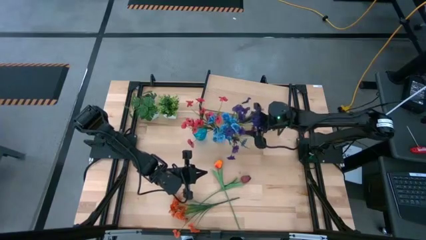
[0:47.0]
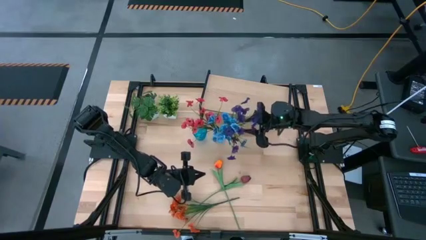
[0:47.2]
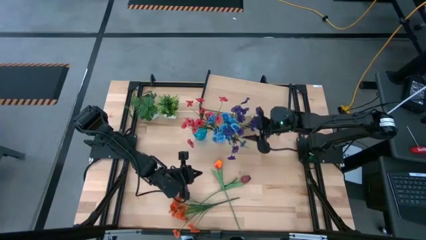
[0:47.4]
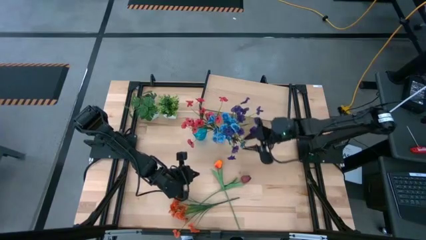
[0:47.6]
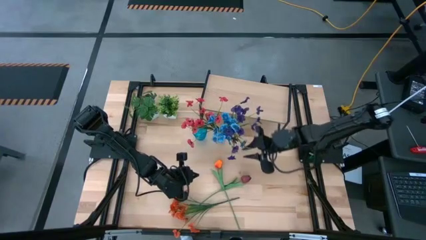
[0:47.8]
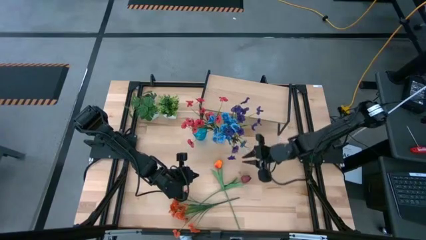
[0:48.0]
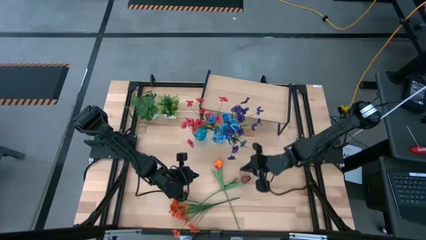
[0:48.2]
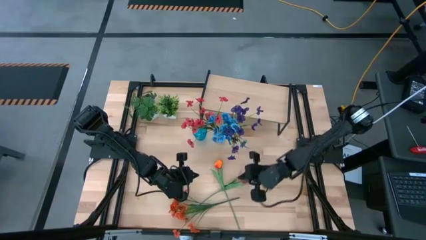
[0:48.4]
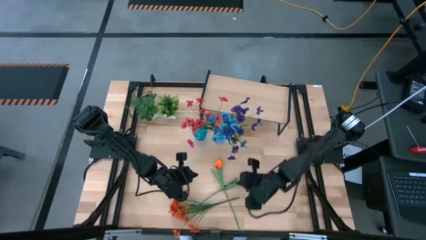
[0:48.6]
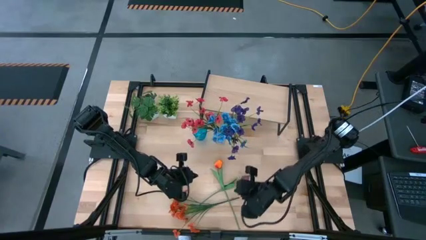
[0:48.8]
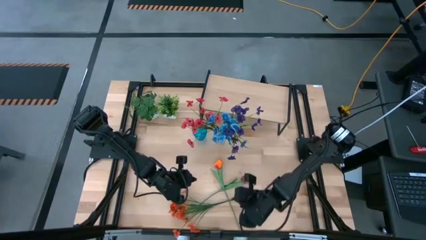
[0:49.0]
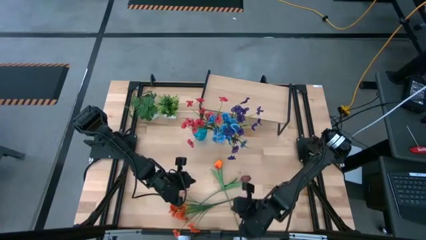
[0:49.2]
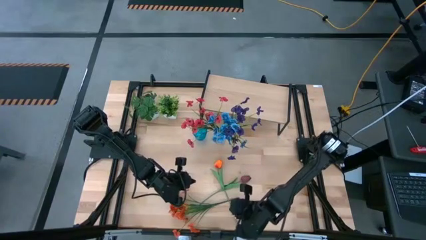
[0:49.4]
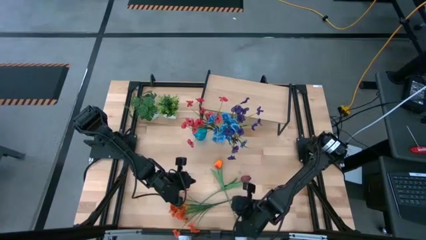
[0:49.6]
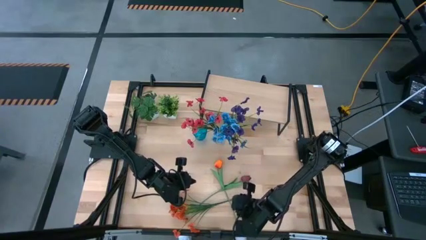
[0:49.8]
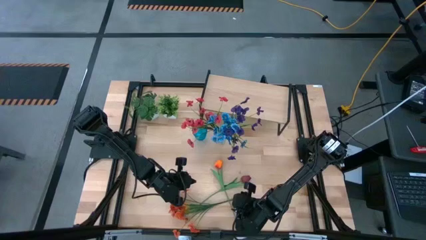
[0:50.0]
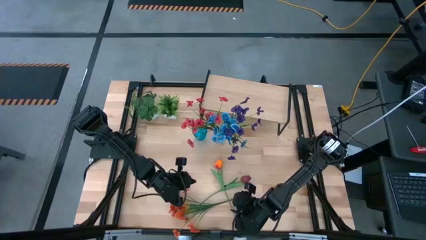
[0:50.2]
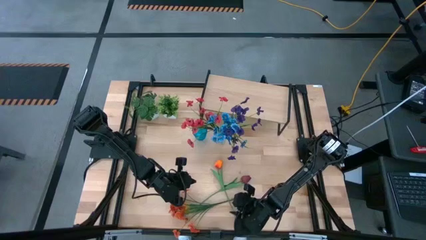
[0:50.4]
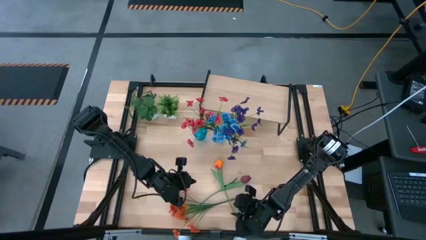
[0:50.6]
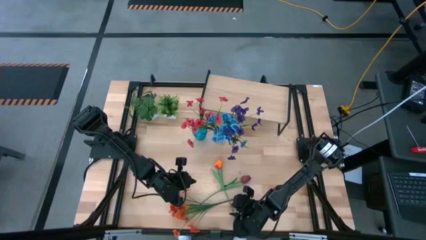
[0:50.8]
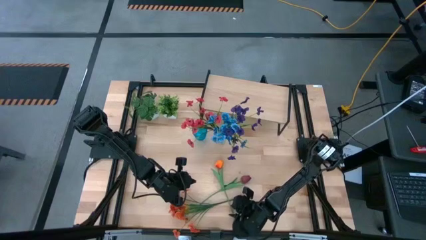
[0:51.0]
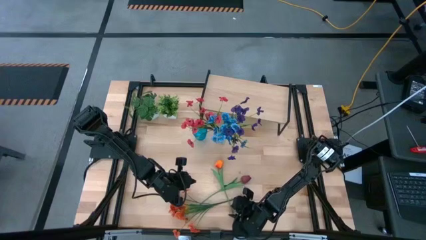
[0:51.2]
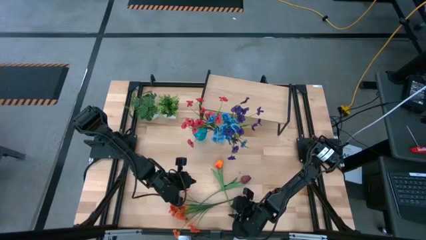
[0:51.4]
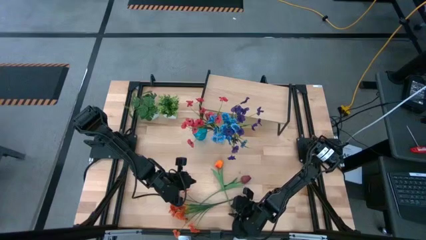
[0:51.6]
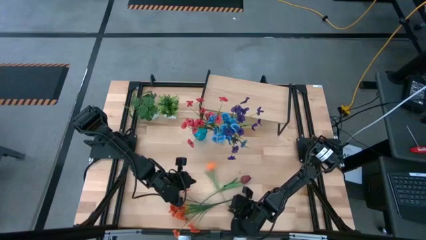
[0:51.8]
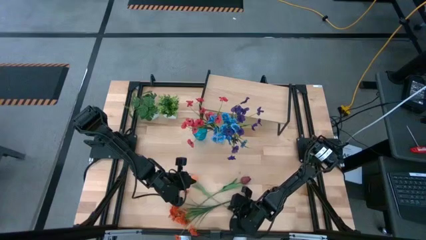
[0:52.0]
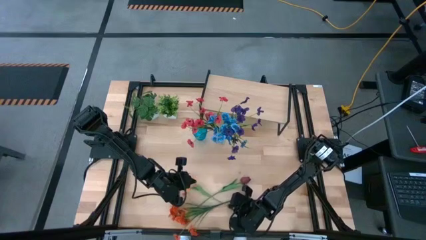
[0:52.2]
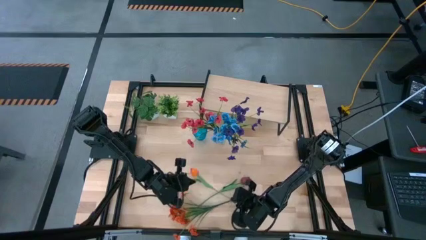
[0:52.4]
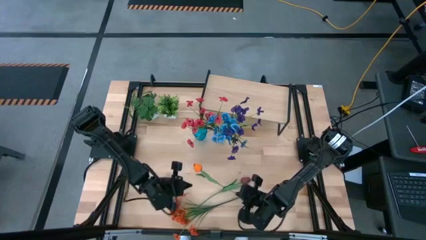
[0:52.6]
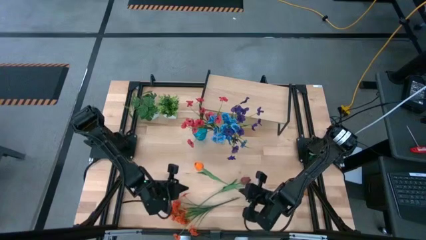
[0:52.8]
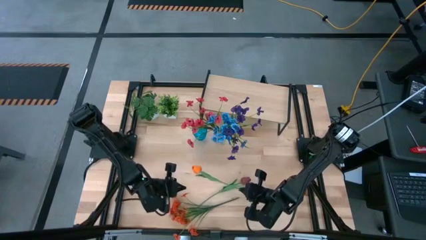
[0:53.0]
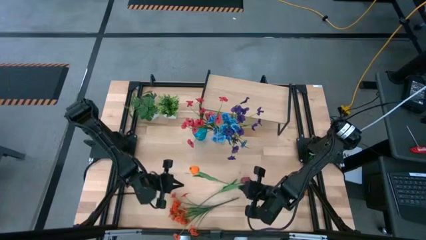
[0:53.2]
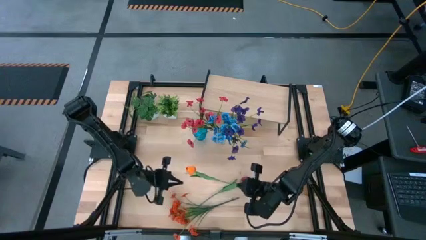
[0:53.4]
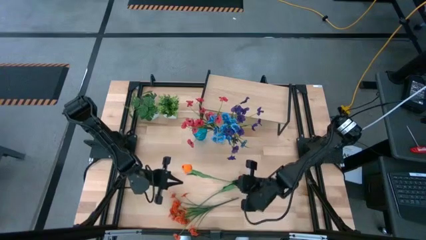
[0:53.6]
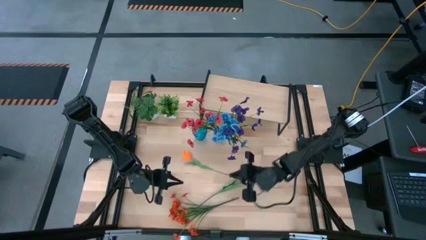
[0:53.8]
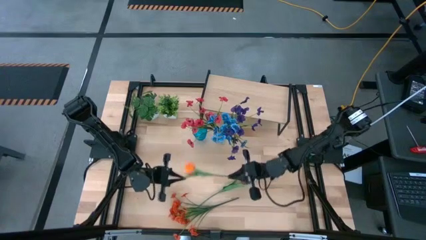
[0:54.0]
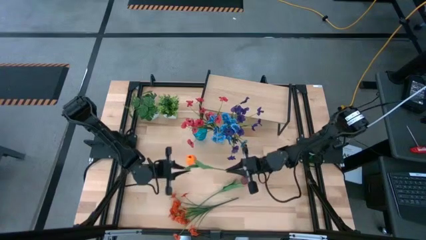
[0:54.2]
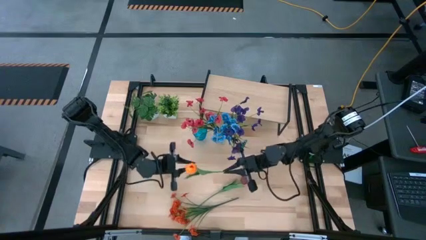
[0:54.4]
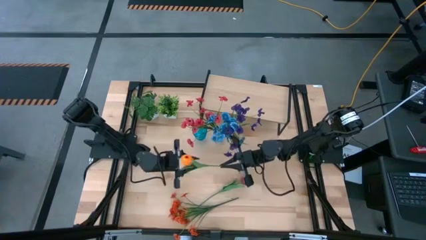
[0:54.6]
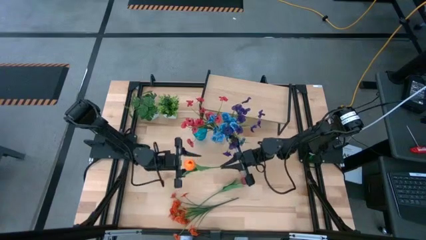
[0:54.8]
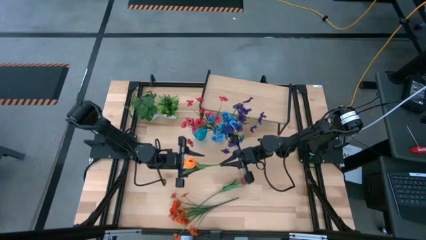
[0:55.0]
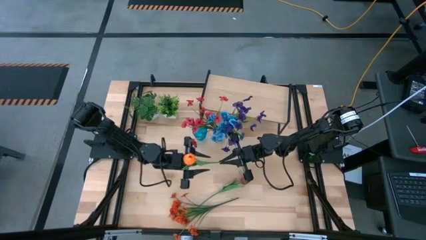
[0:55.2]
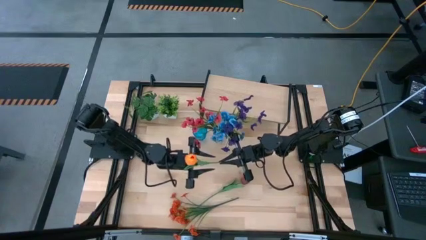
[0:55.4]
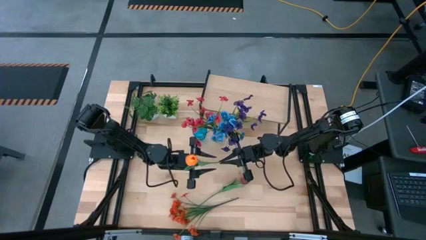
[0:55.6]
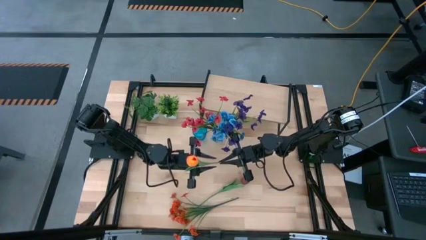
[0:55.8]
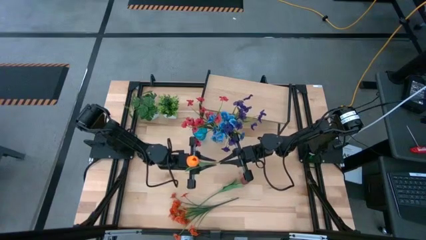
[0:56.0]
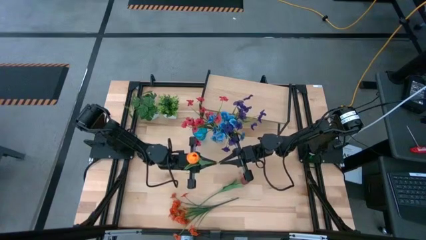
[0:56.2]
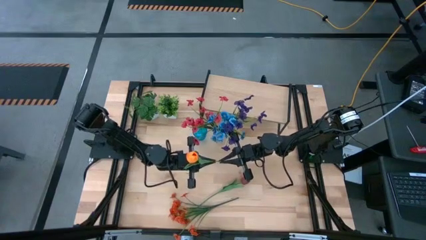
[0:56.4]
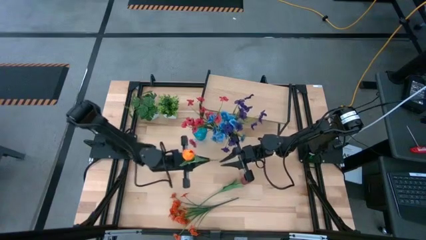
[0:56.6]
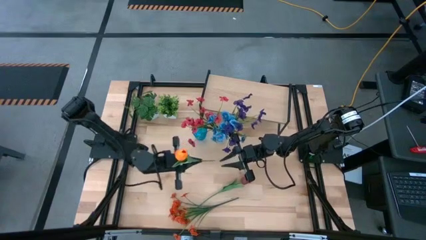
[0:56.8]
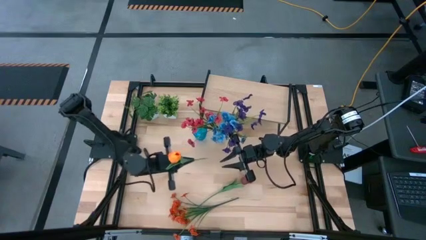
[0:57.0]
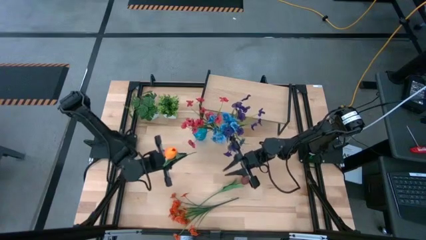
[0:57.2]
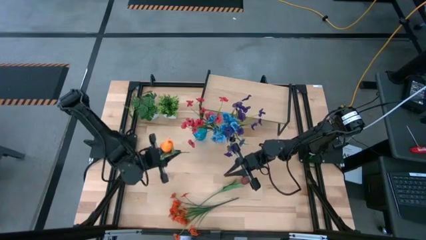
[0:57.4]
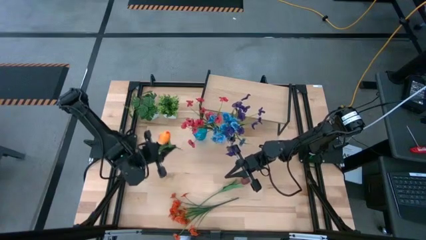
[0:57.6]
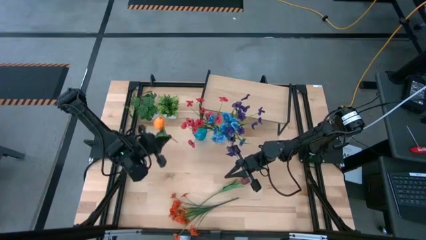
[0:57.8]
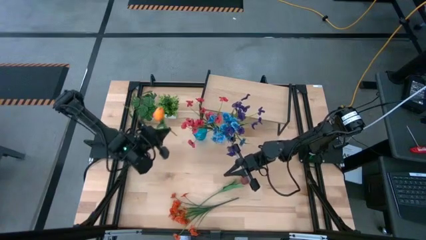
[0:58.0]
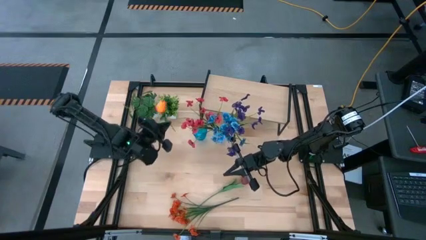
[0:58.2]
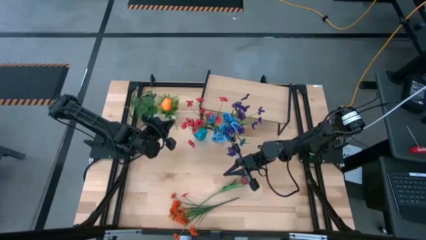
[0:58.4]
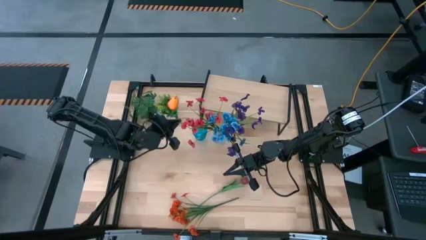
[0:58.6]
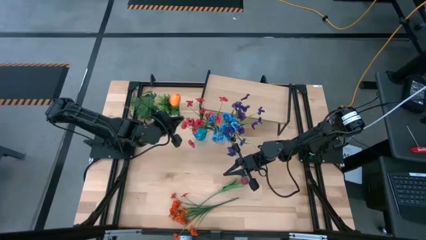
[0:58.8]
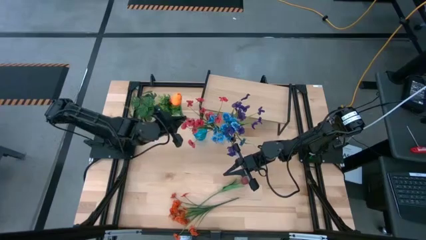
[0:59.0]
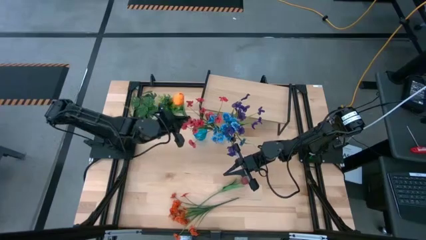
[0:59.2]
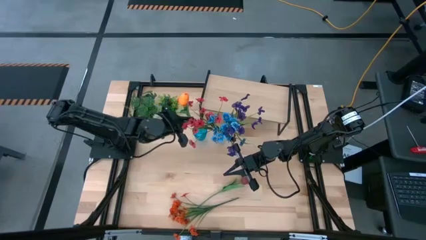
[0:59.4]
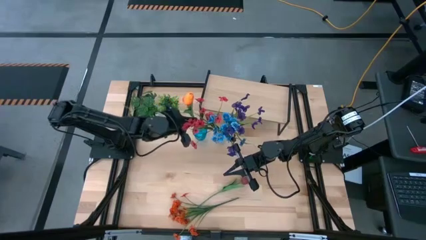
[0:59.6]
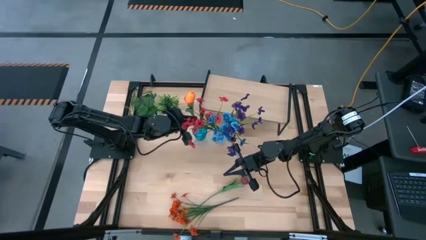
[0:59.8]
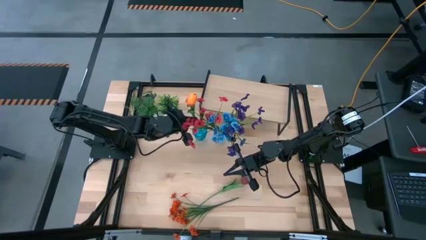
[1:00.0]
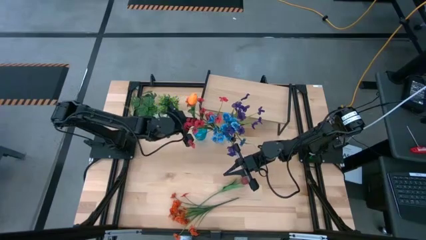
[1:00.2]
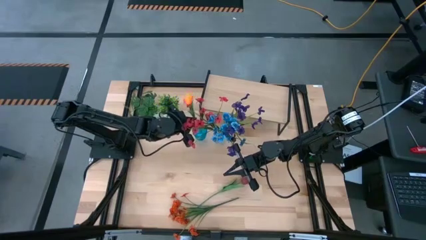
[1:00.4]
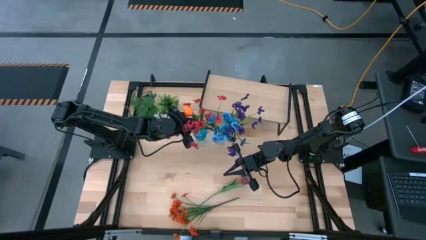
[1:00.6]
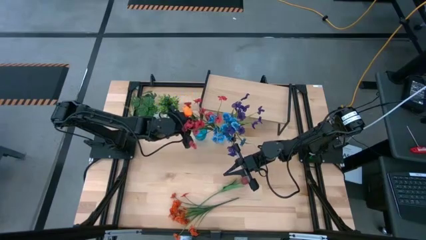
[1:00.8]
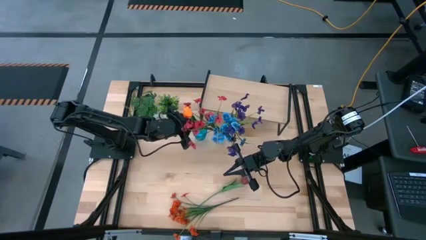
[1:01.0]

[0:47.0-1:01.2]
Task: Pick and place flowers into a vace then onto a shelf
Put the orange tulip into the blue vase
